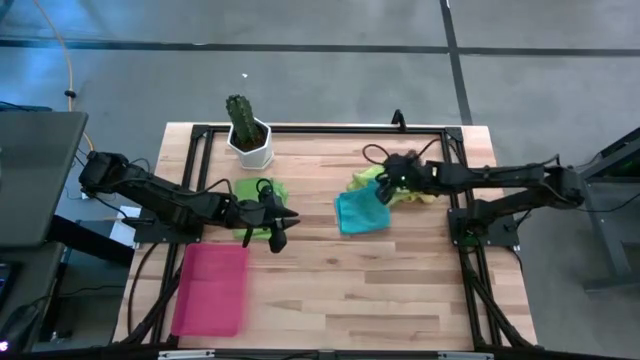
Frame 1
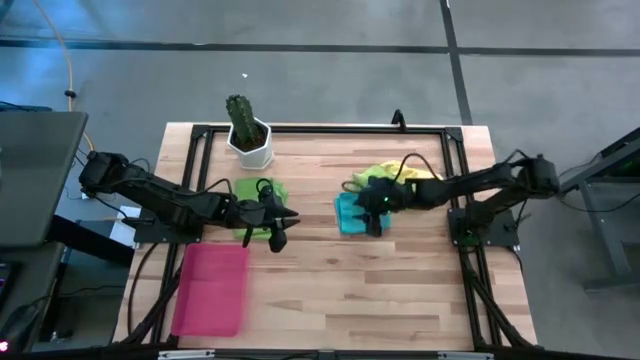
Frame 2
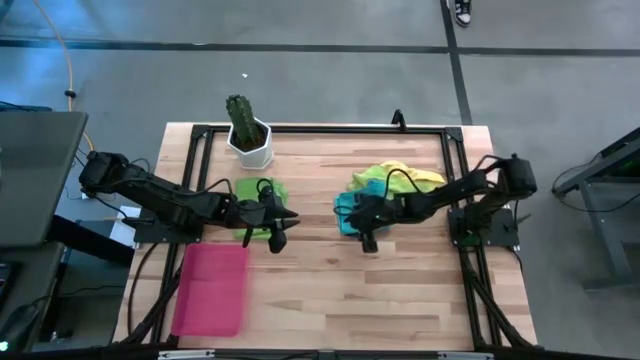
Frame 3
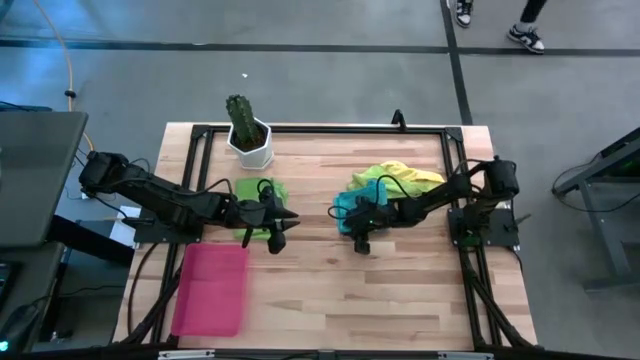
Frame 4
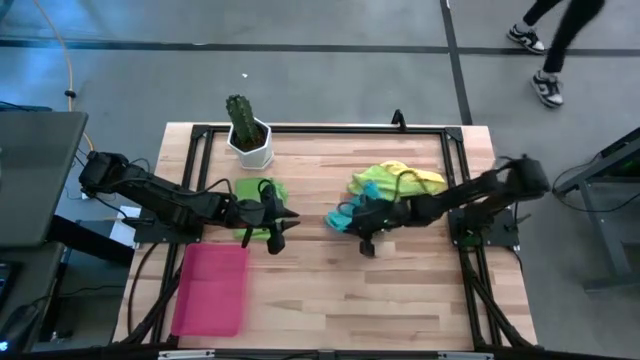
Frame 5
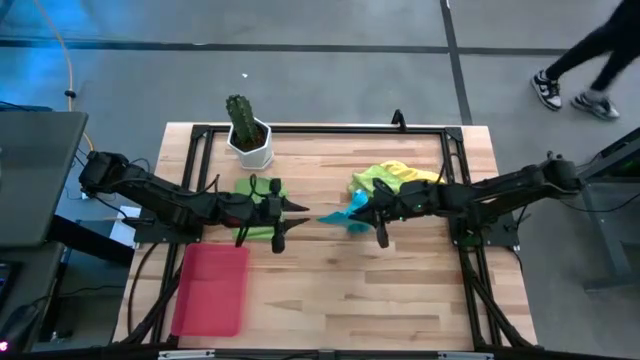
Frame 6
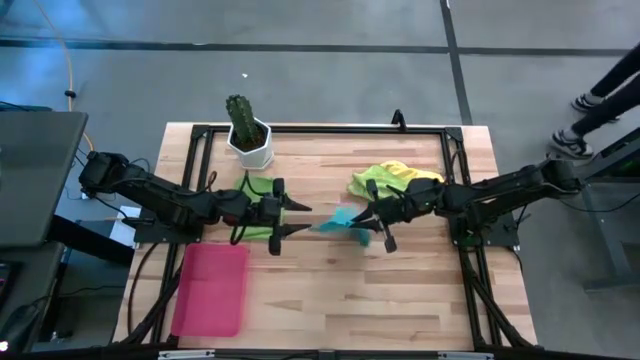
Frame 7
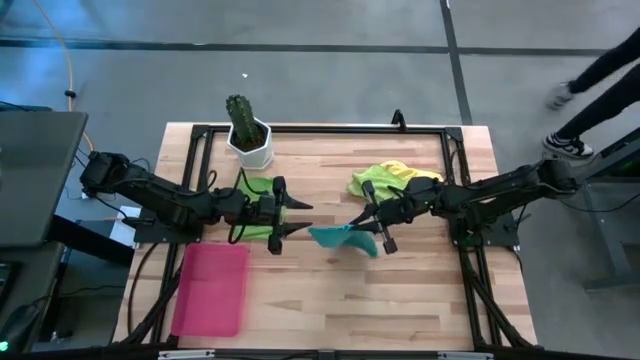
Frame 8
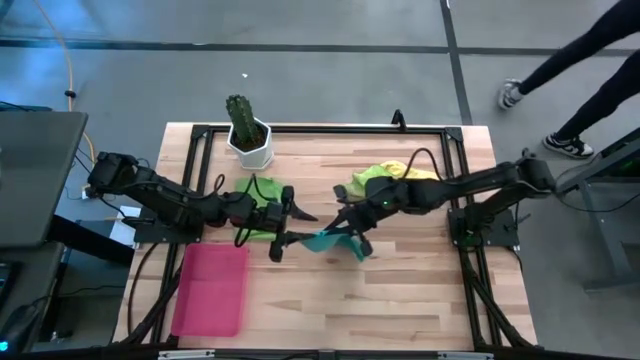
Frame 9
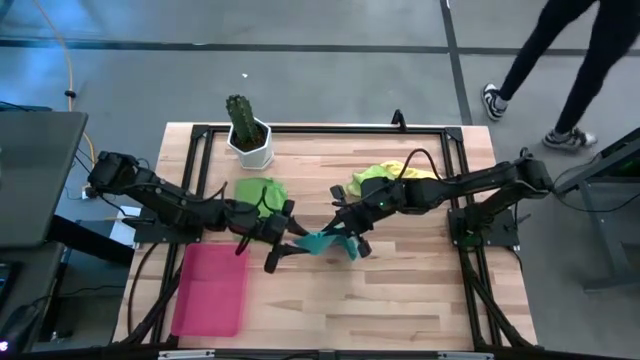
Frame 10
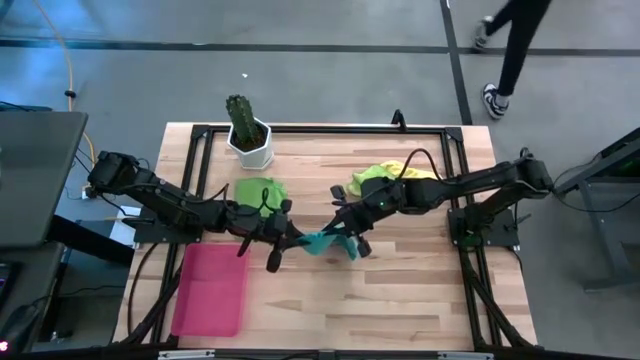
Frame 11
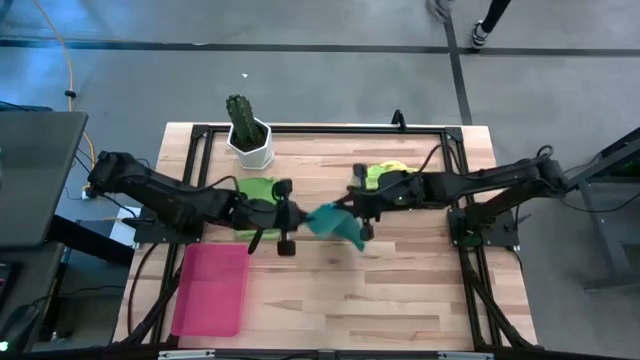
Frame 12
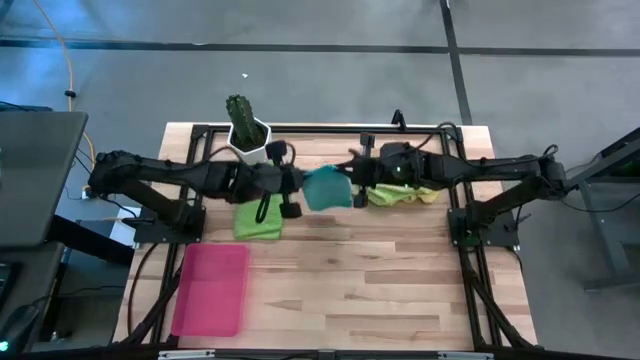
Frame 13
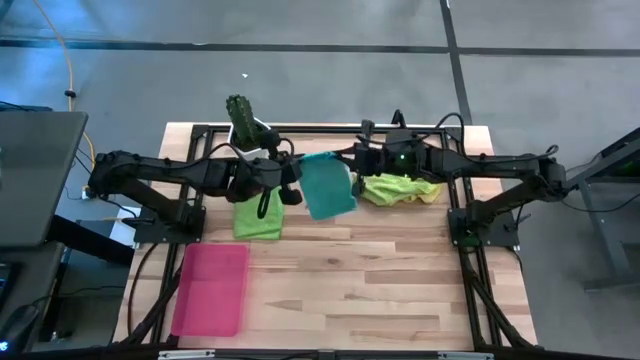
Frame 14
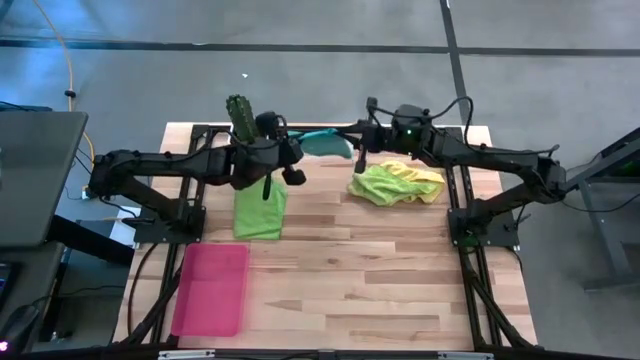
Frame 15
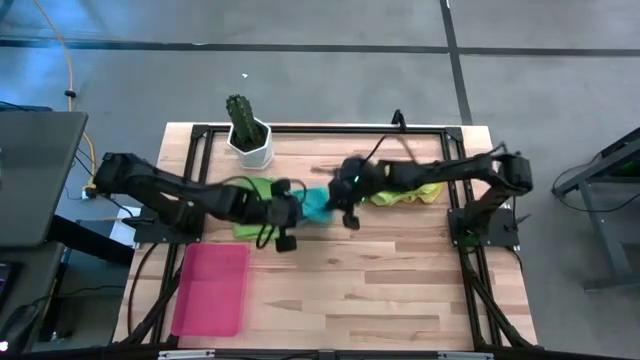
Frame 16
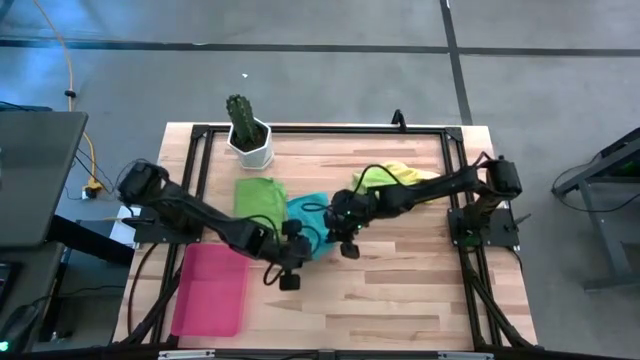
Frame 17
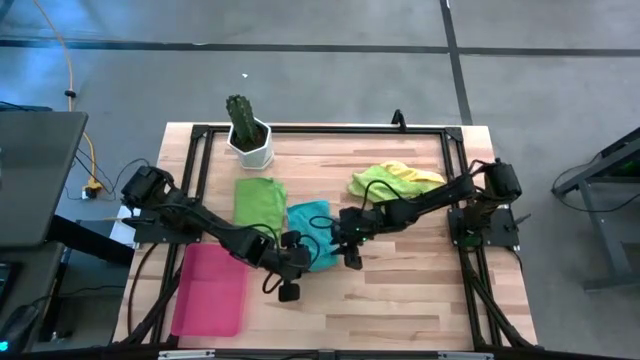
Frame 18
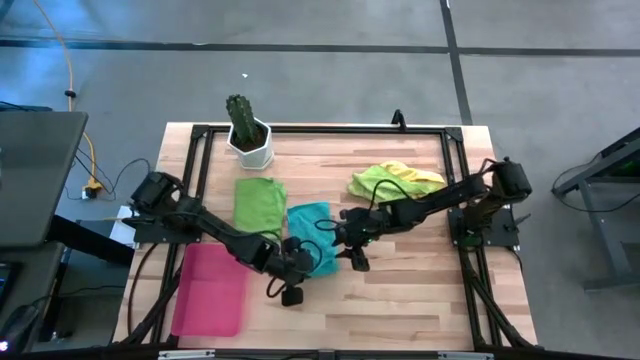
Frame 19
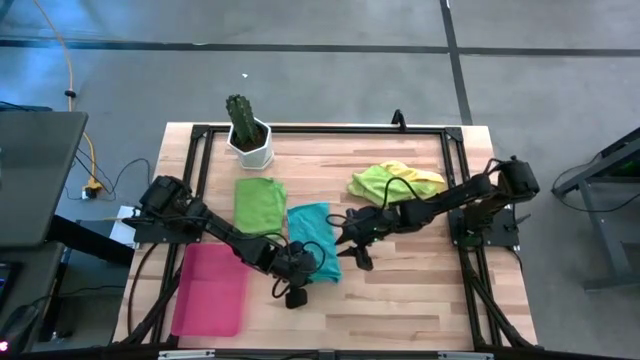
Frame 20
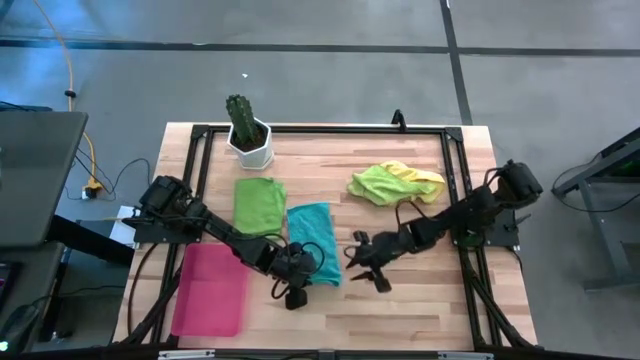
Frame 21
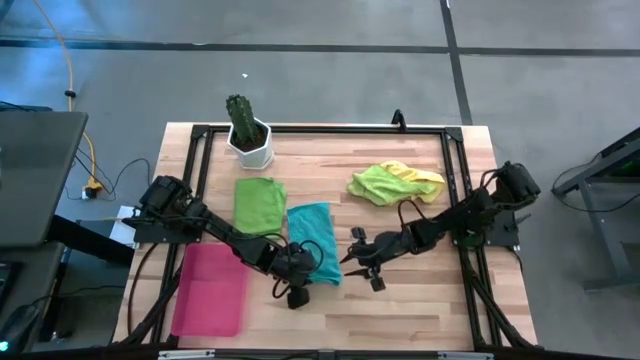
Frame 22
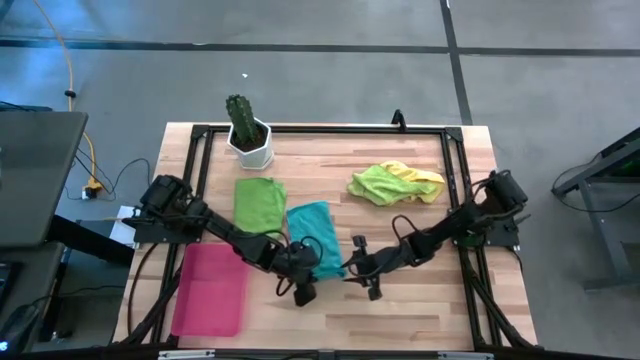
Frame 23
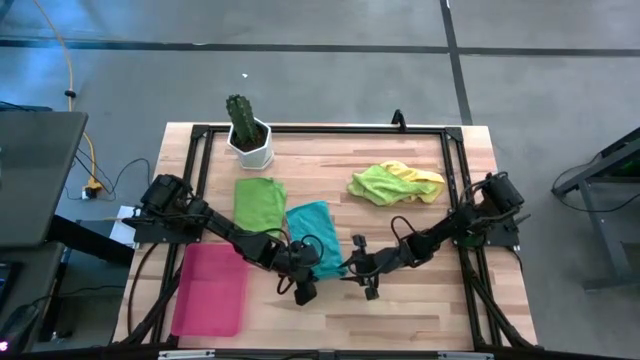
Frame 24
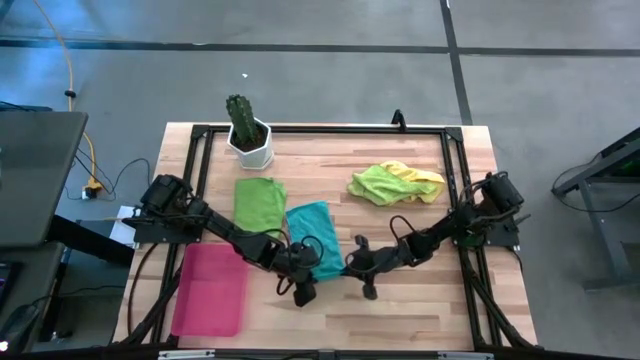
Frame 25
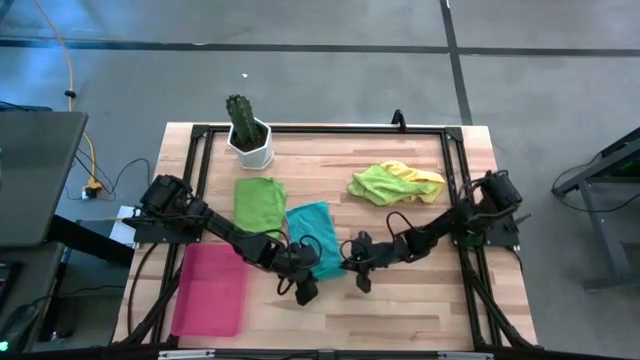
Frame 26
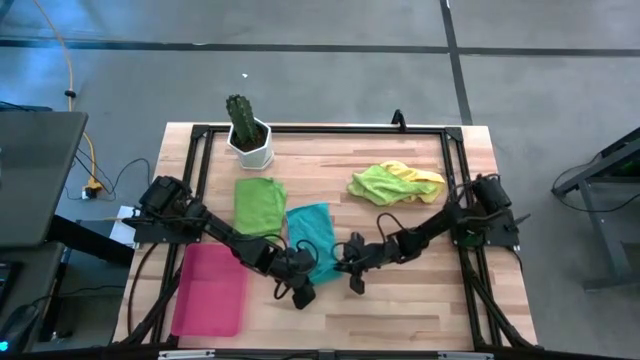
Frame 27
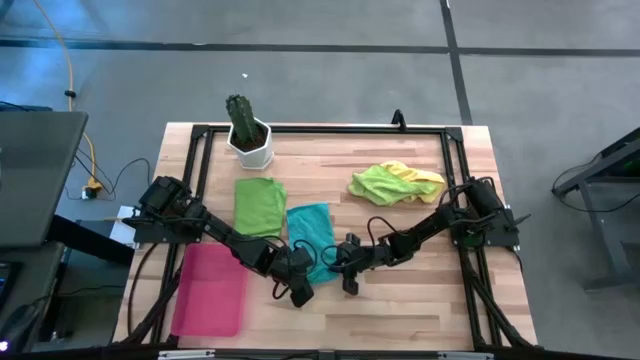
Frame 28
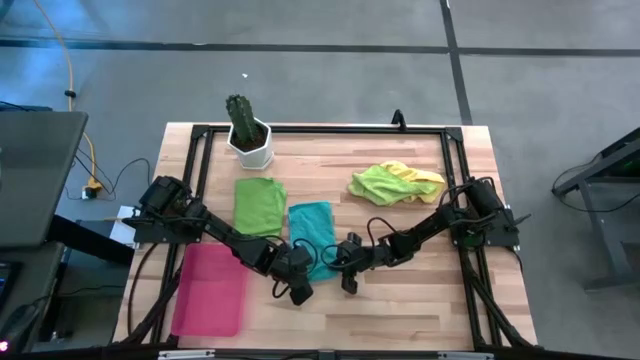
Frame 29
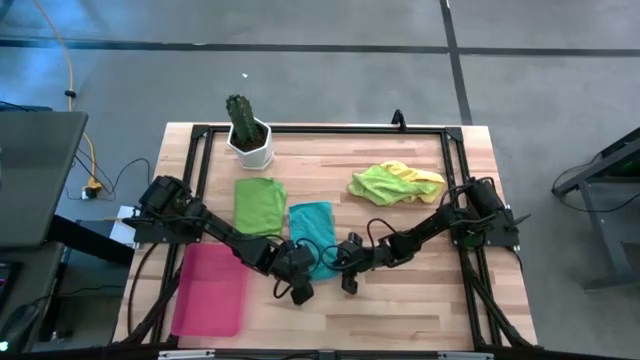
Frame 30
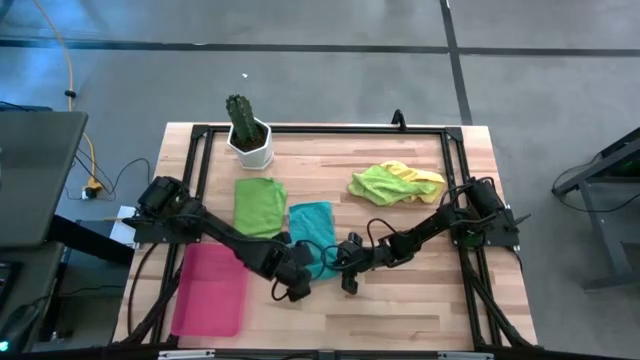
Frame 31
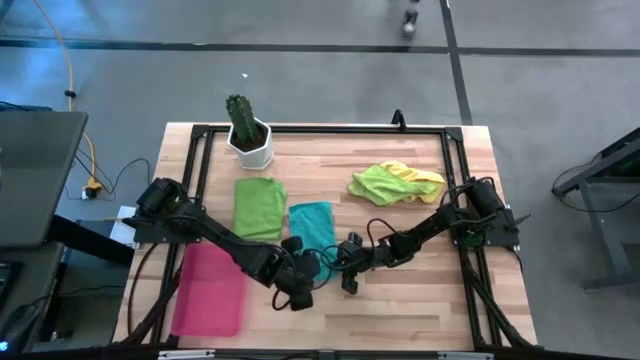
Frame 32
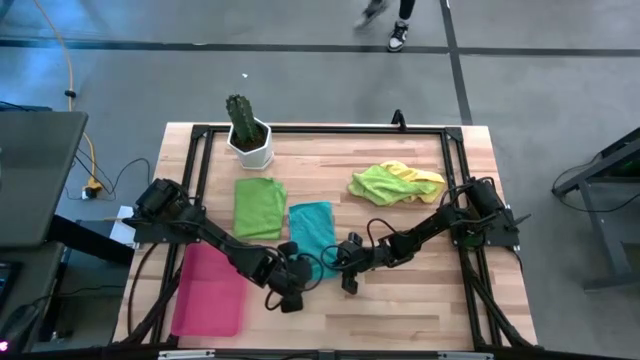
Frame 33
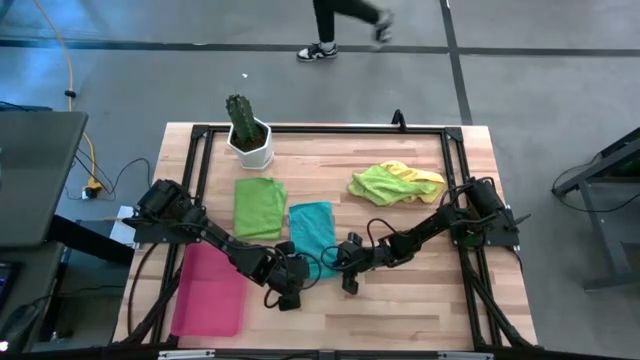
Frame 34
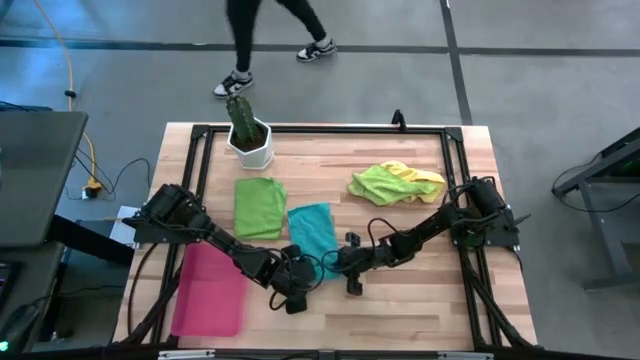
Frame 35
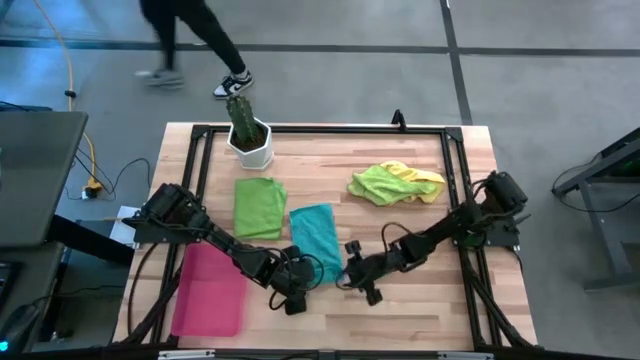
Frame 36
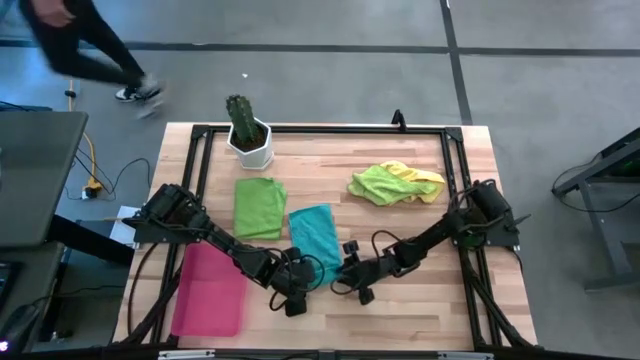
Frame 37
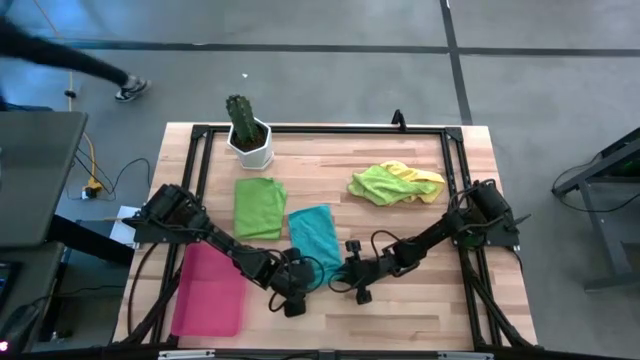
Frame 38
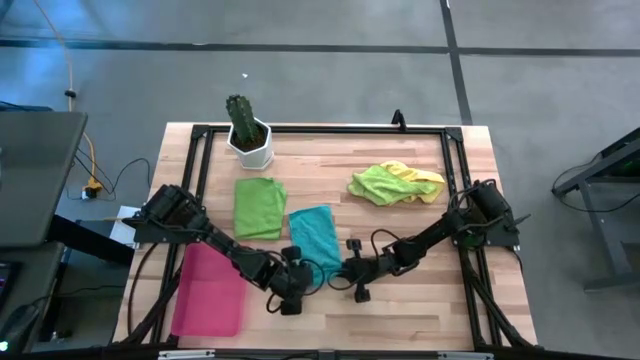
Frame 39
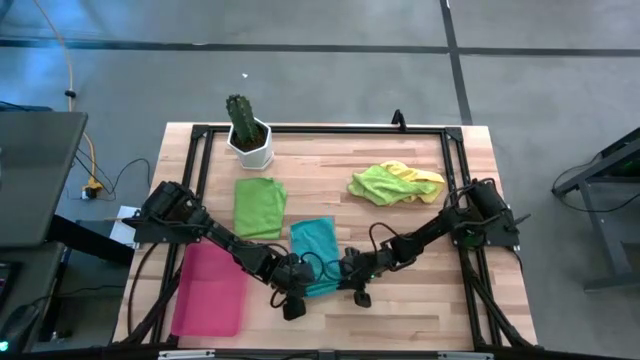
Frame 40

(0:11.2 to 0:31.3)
Task: Roll microfiber towels into tight, uniform cylinder then place into a basket
Roll the blue towel
